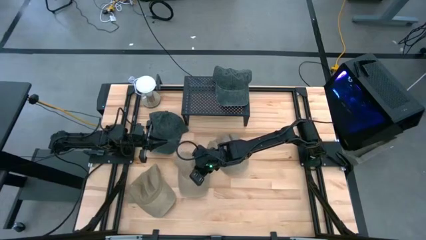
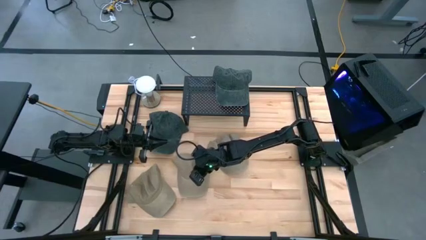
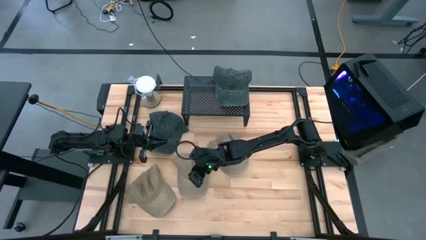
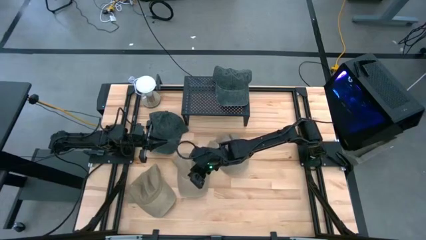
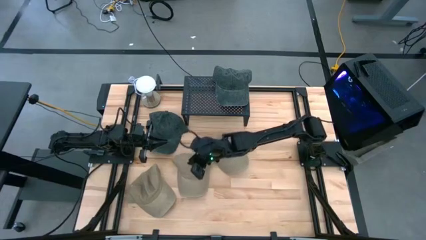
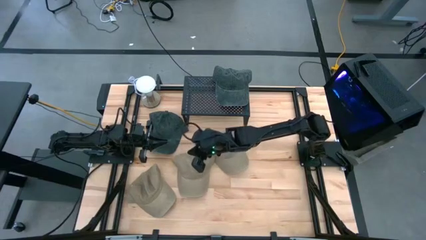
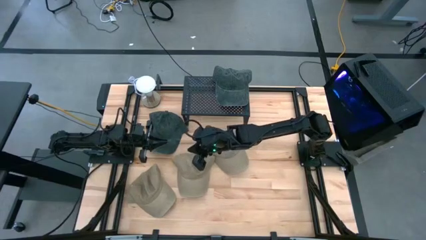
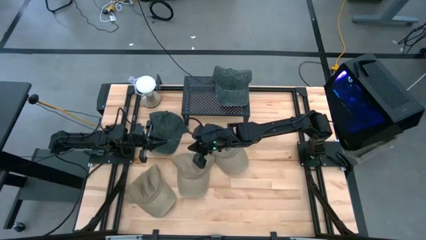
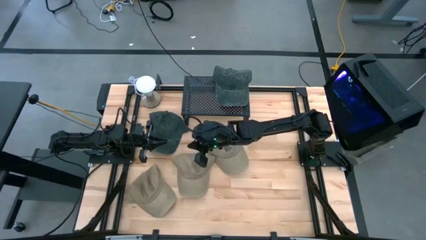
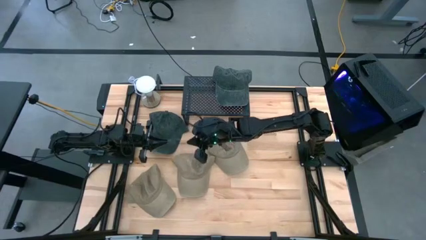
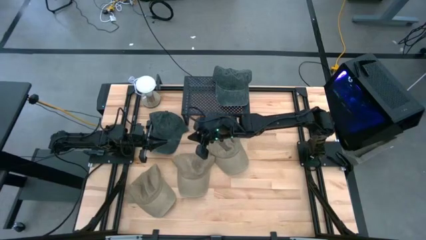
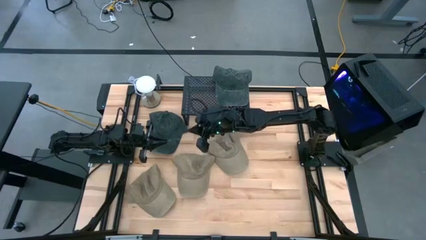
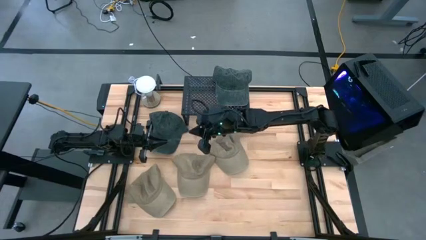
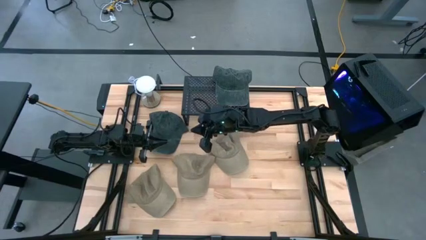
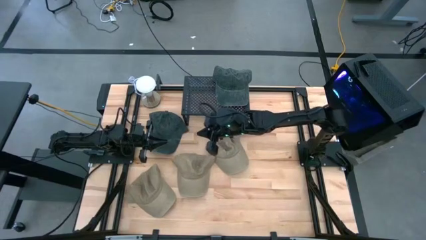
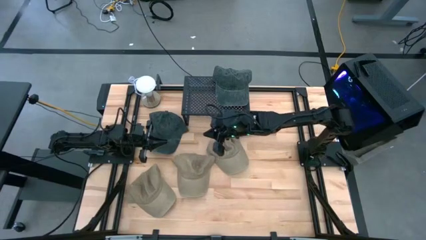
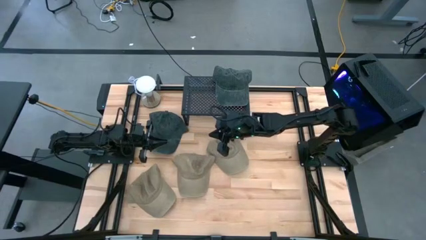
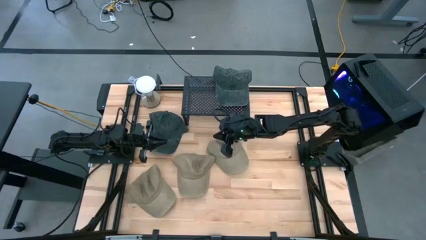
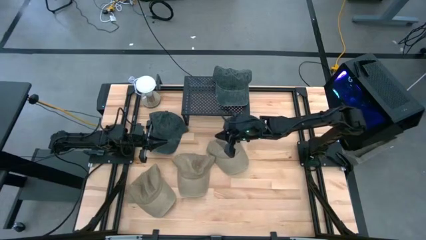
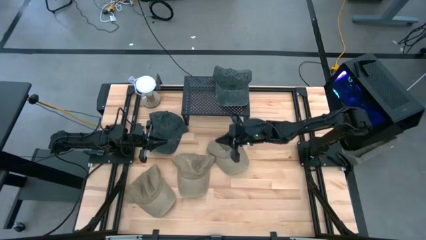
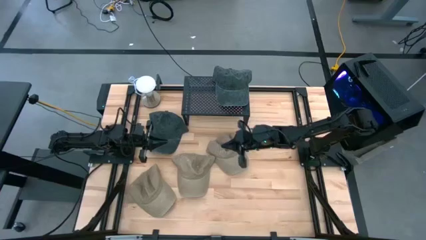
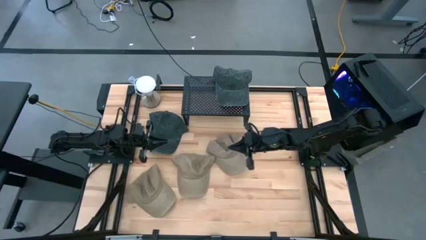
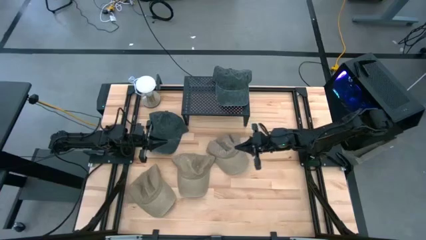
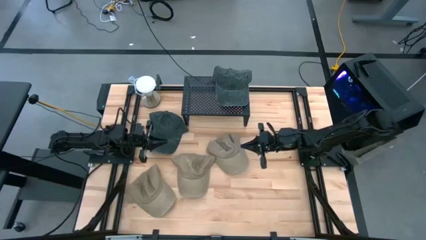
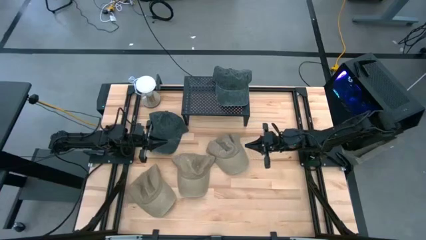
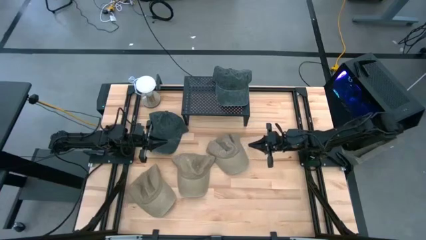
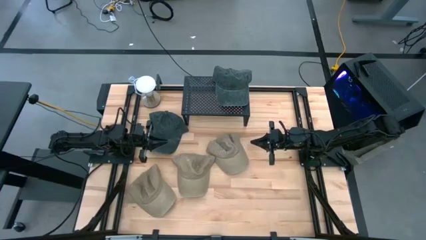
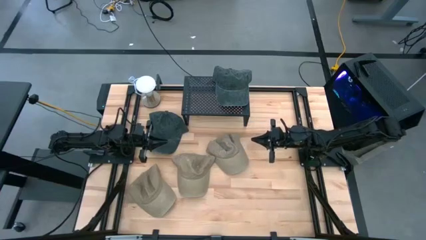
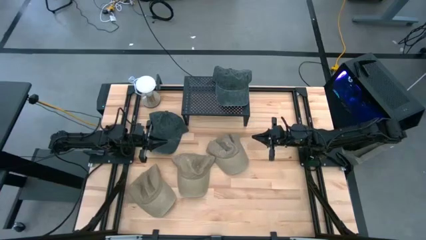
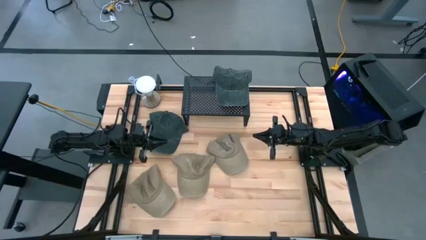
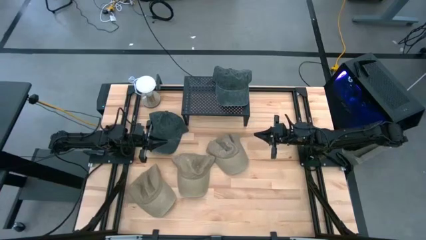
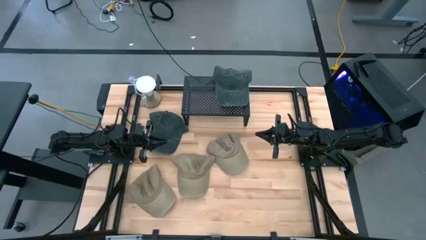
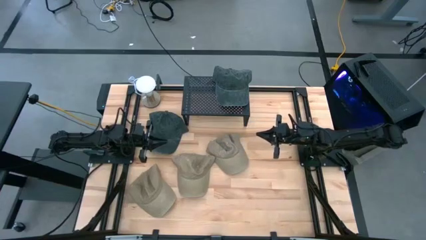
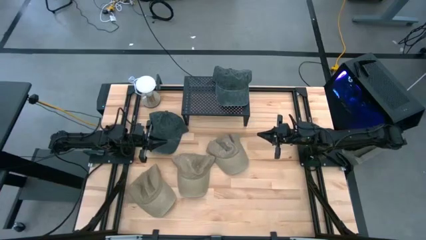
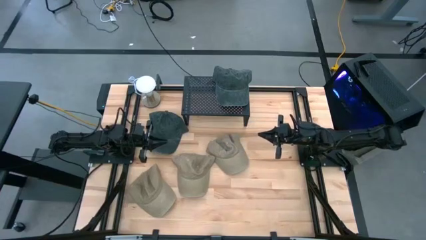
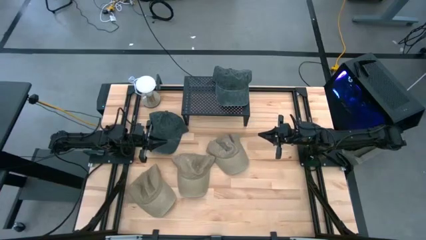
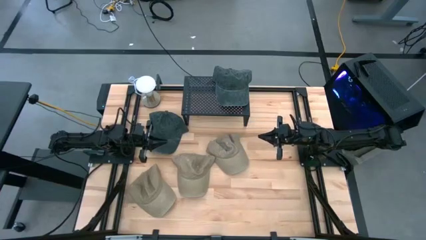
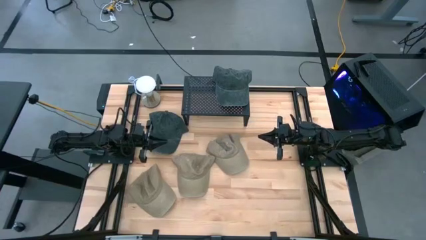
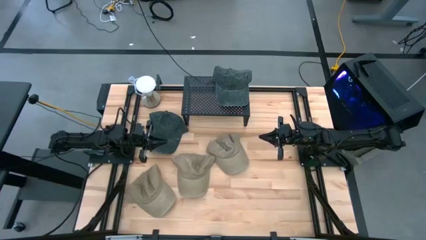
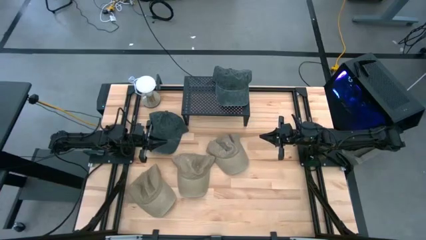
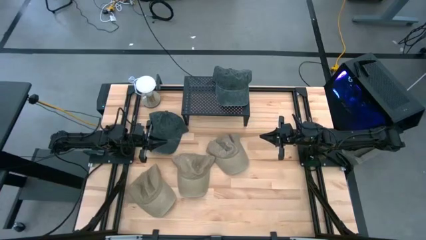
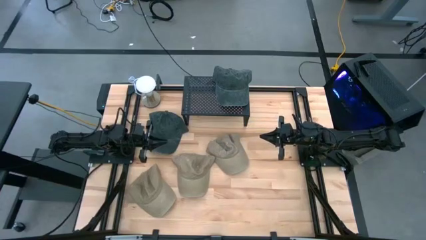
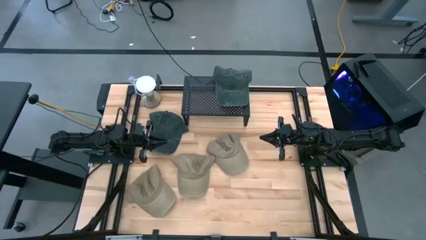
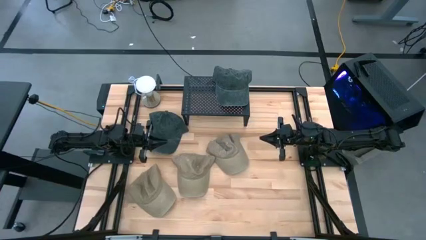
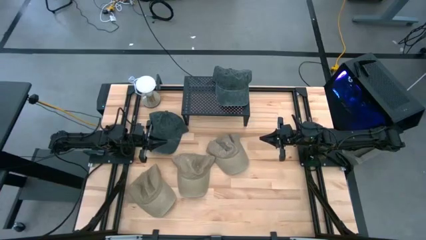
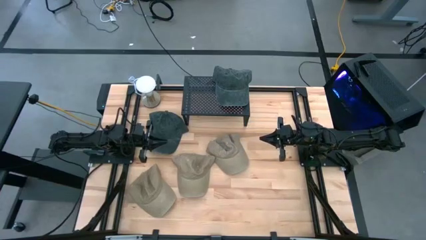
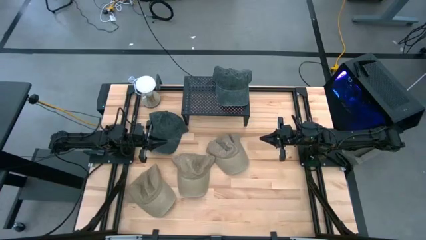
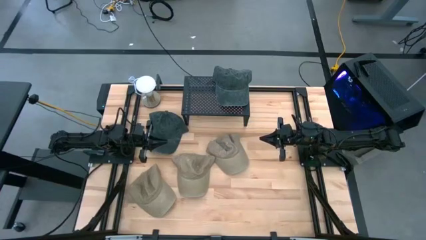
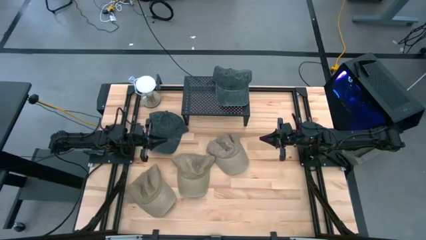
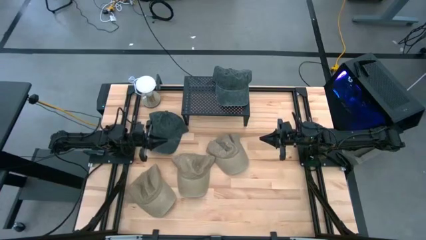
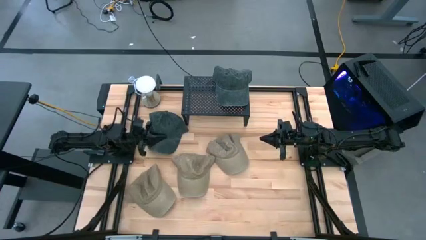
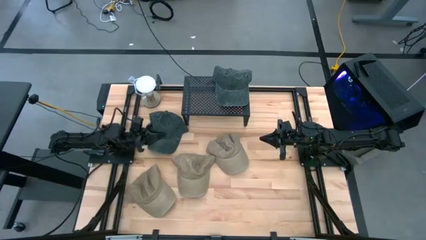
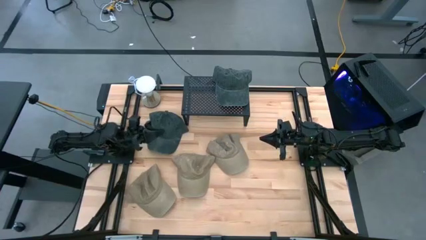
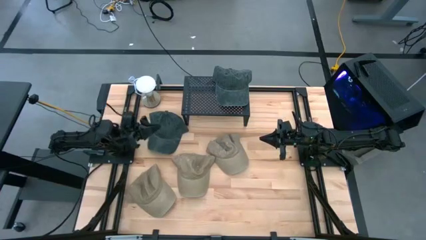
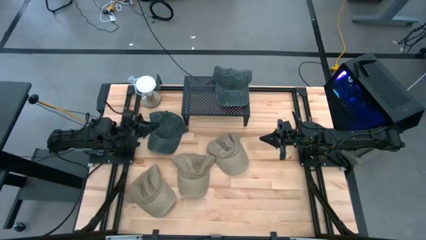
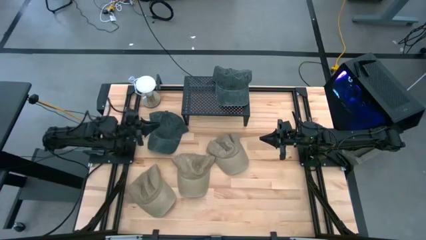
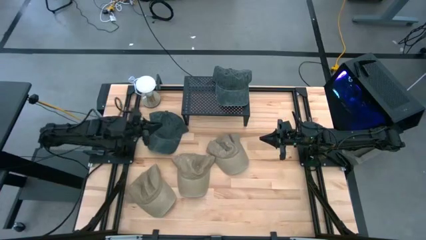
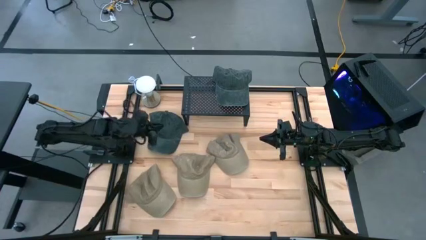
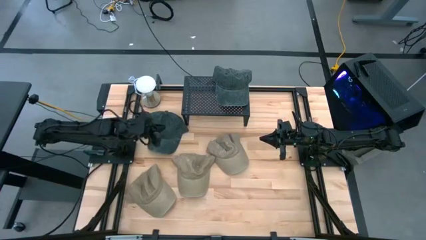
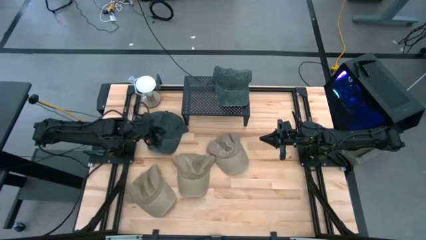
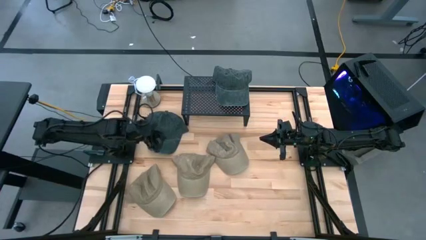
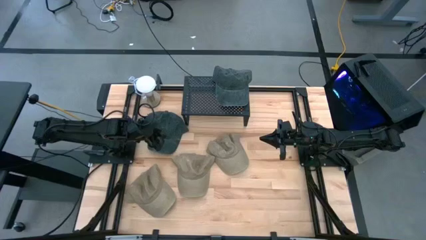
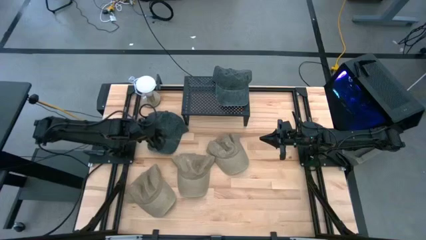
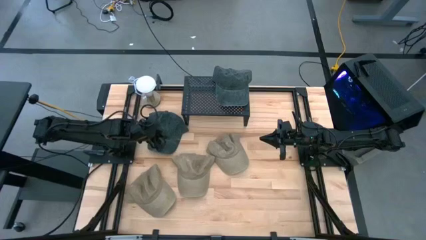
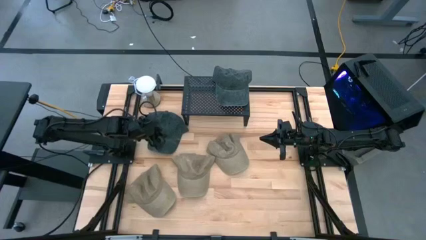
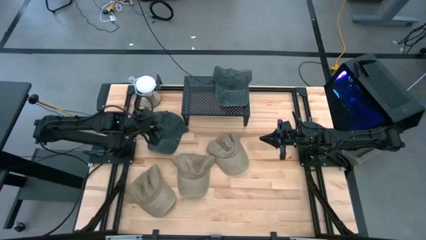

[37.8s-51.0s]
Task: Pick & Place hat
Stack the green cap on the other green cap on the shelf

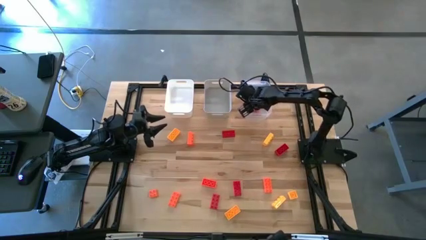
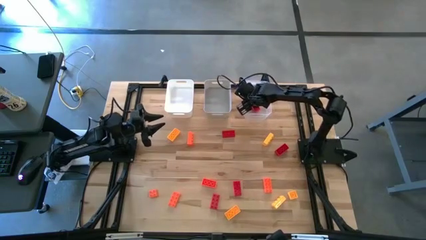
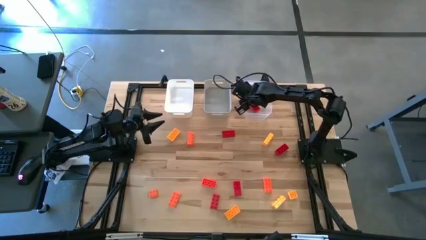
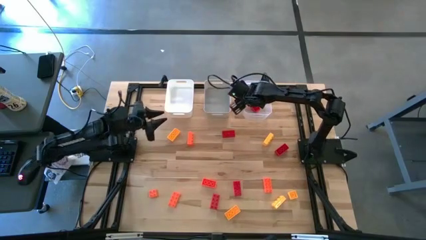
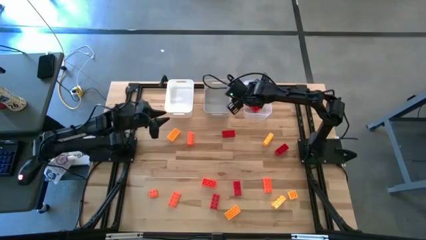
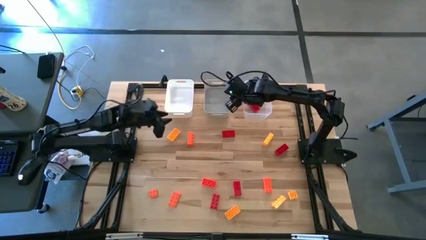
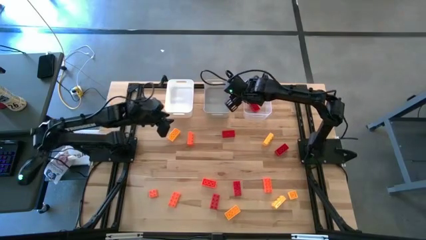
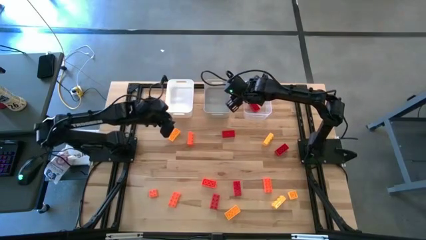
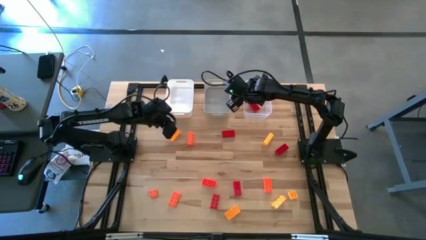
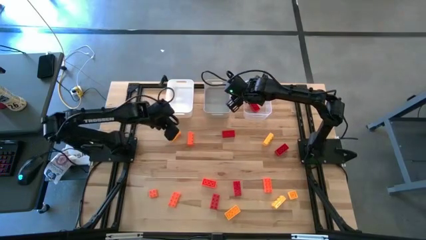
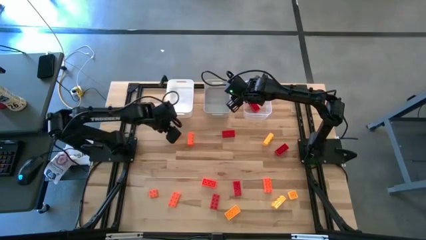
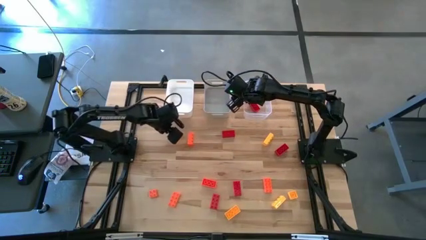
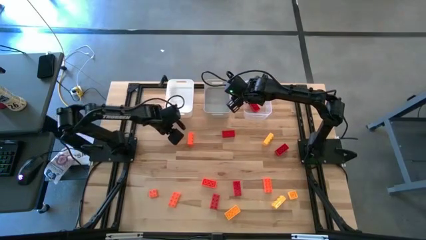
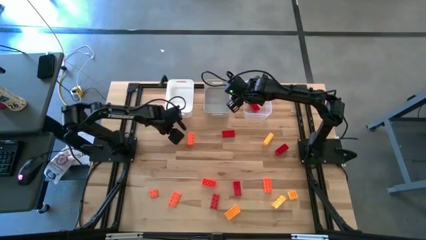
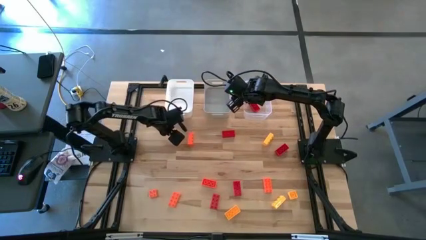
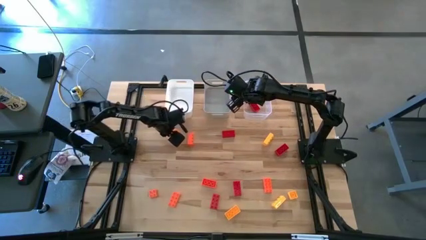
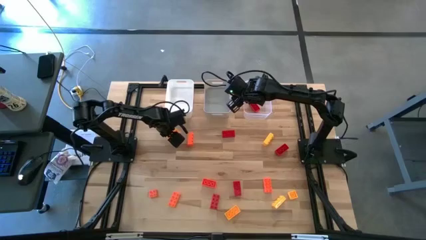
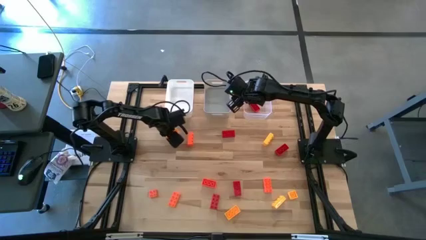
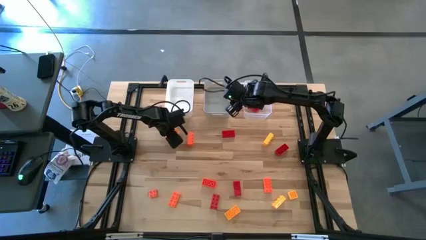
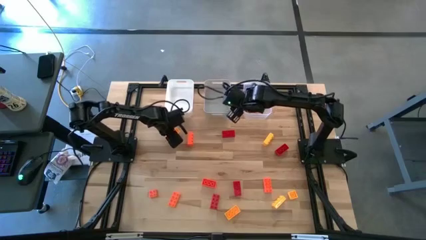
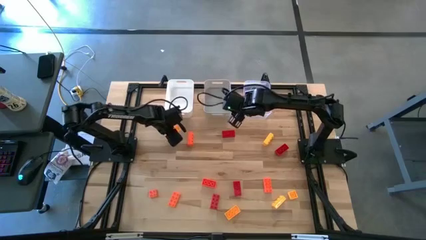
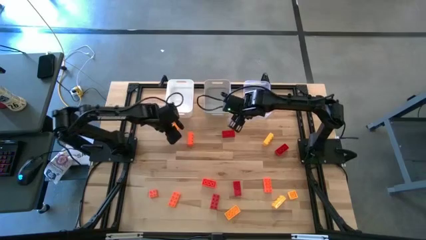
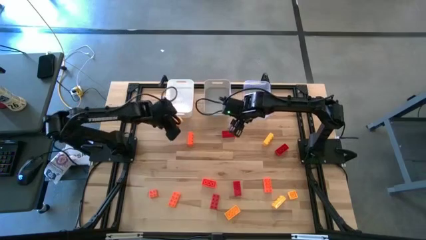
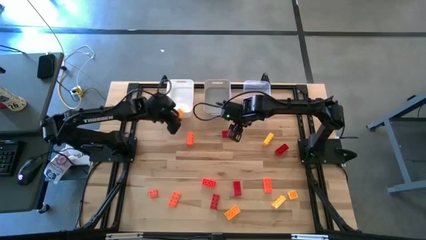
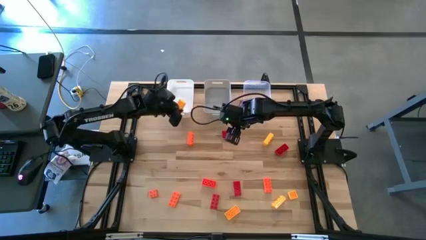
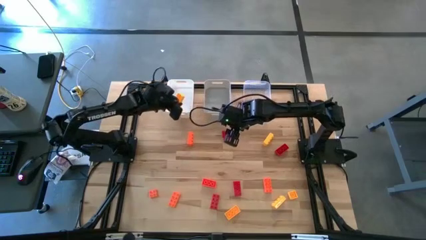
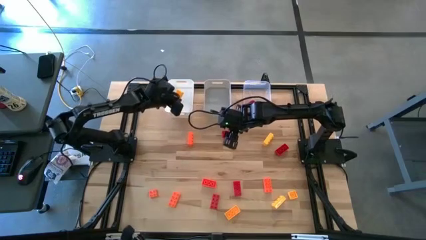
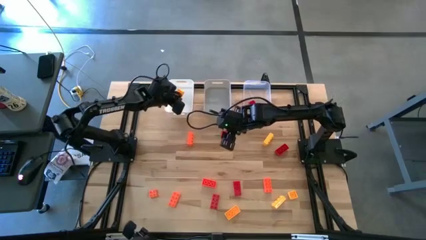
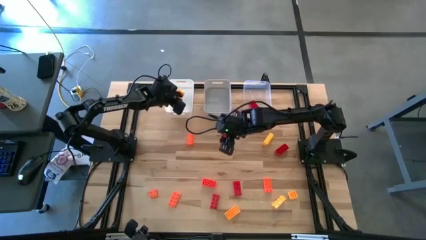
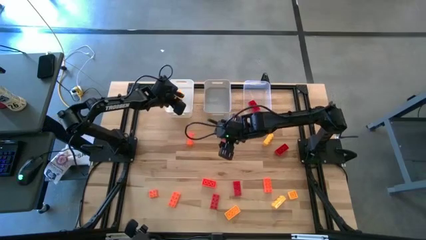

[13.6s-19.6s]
Task: Sort & place blocks by color
Put the yellow game piece into the white bin
